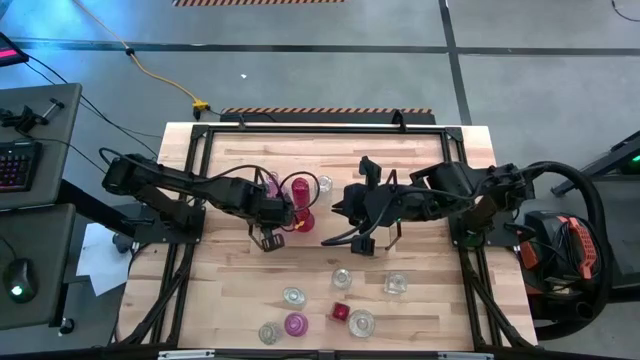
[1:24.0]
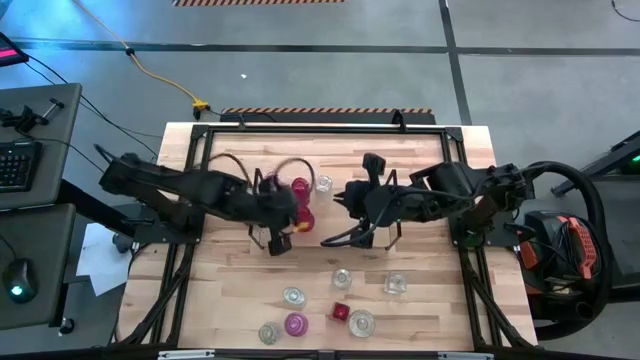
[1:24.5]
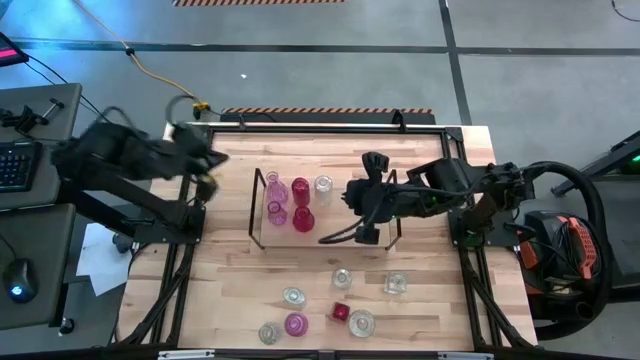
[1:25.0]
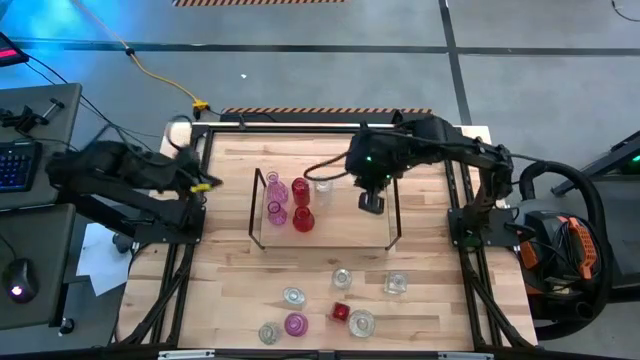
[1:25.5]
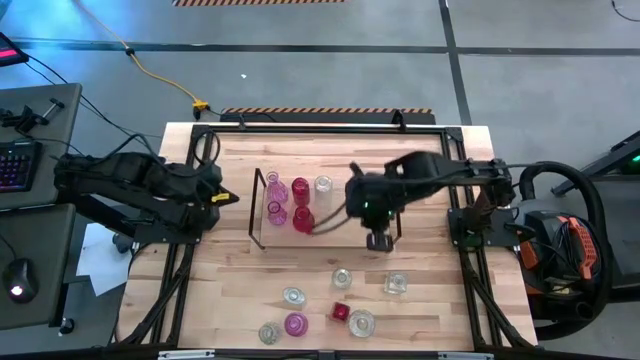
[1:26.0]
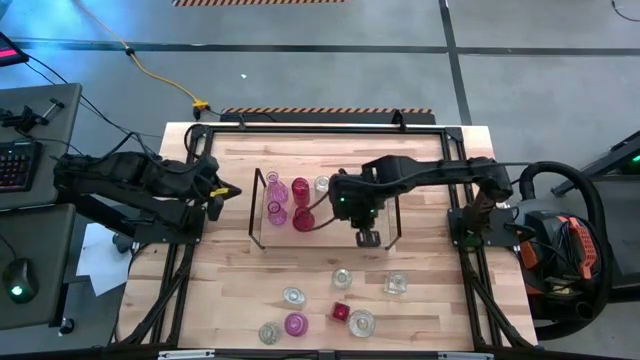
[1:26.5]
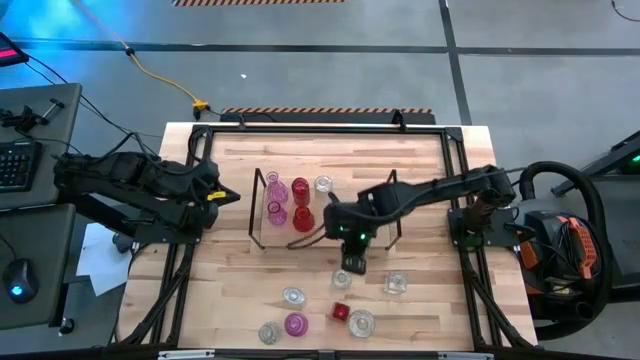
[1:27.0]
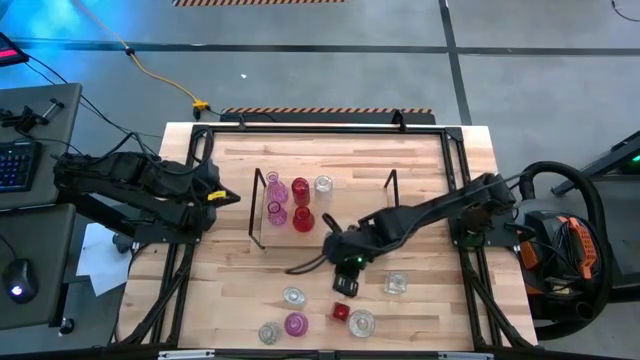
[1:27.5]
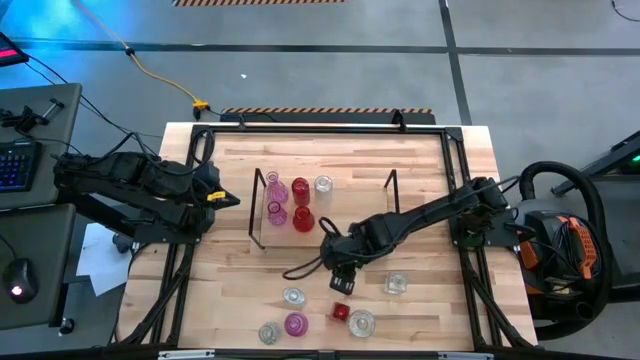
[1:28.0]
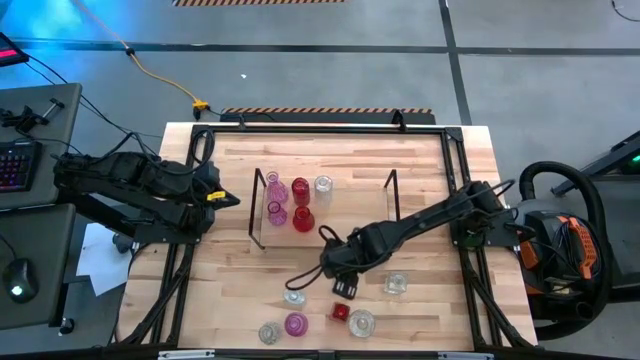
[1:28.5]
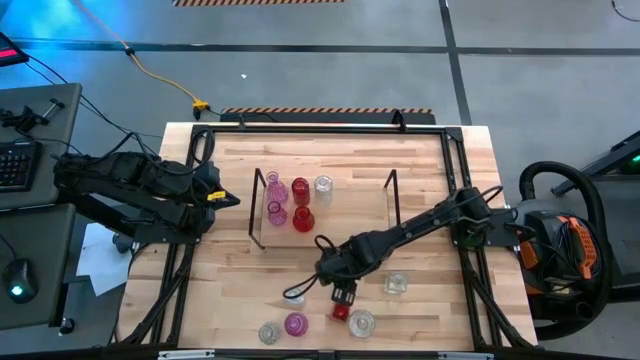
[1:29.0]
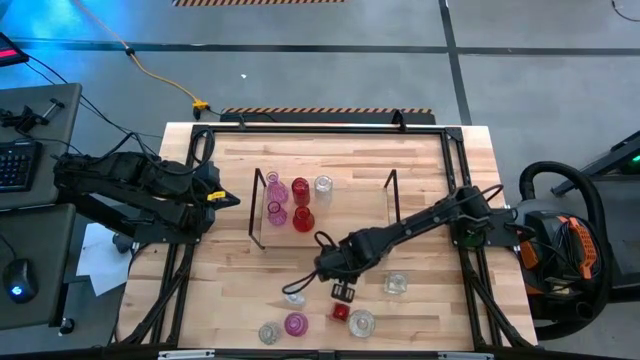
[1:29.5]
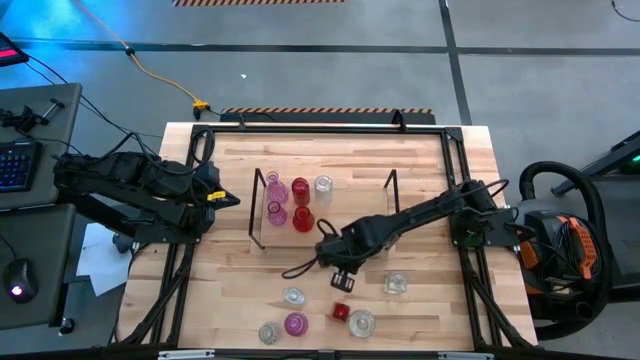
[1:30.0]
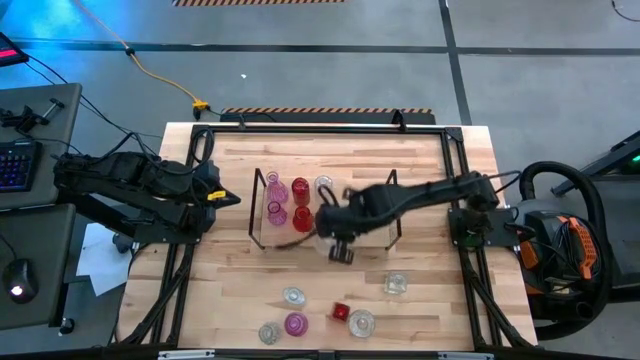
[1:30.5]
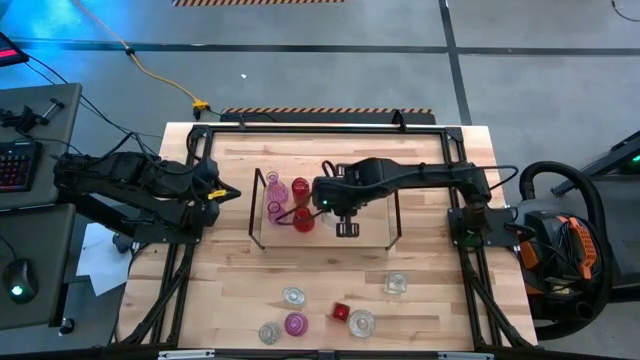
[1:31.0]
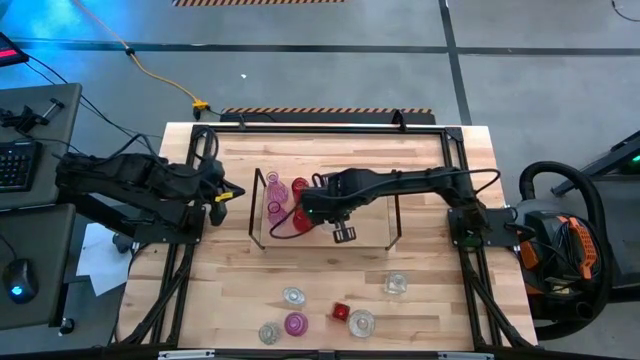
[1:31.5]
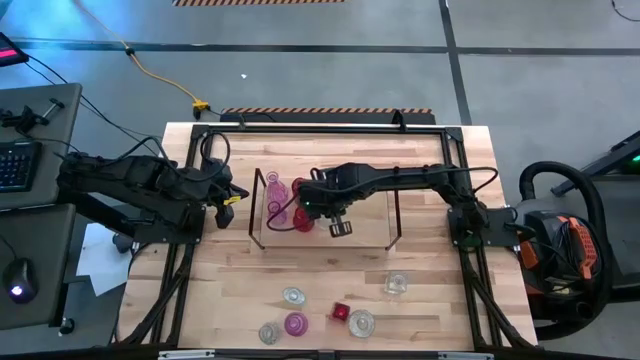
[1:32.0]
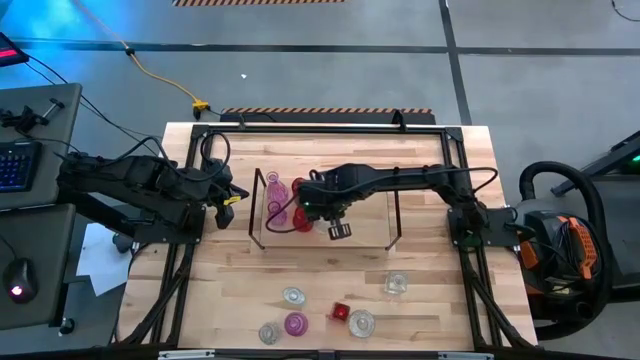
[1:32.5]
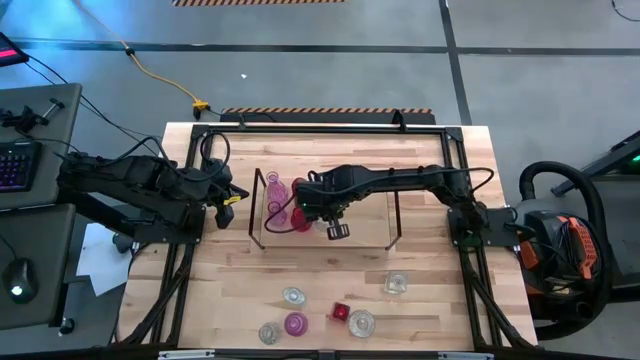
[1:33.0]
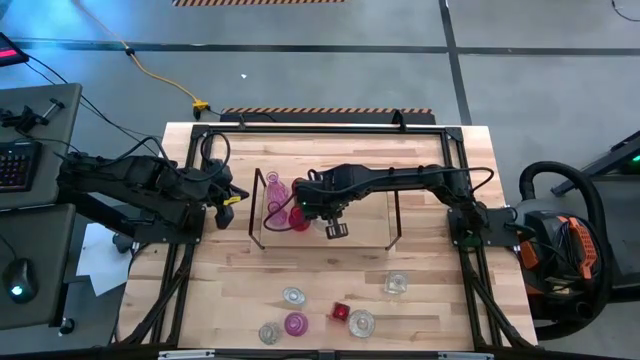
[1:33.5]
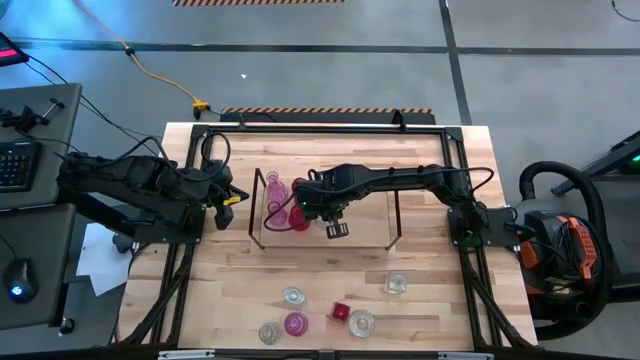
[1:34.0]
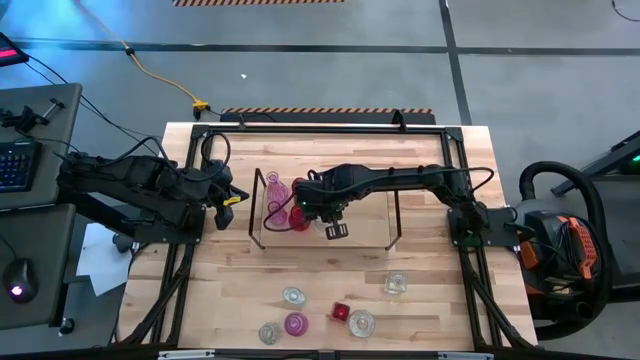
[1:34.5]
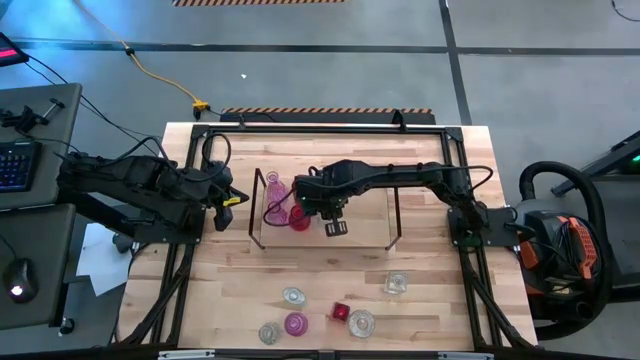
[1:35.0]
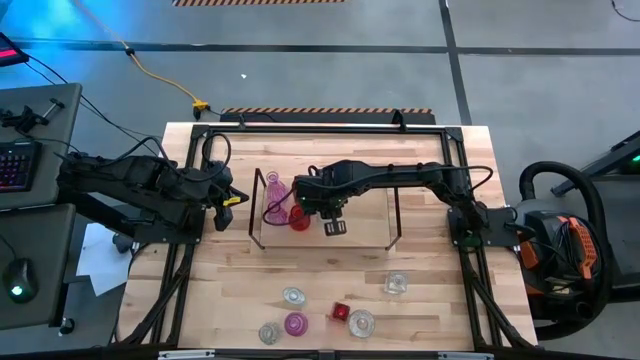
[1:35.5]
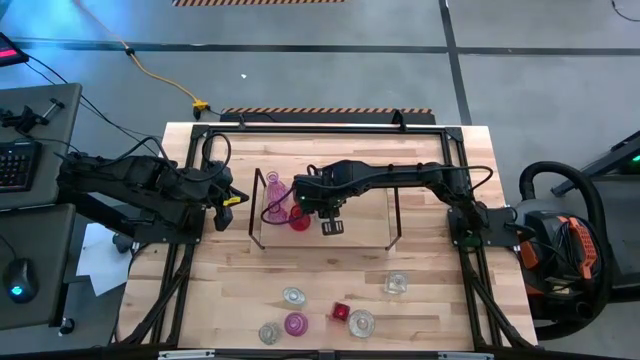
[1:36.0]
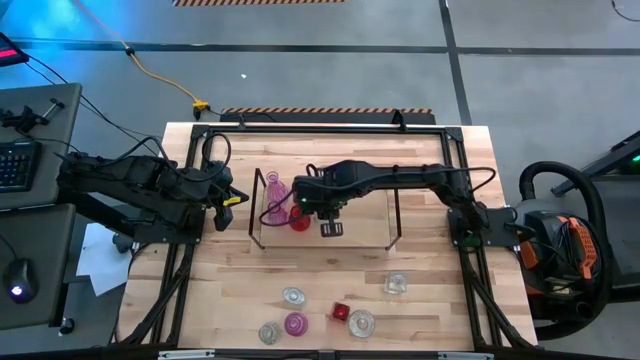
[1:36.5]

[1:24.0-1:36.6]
Task: sort vases onto shelf
Put the transparent vase aligned with the other transparent vase on the shelf

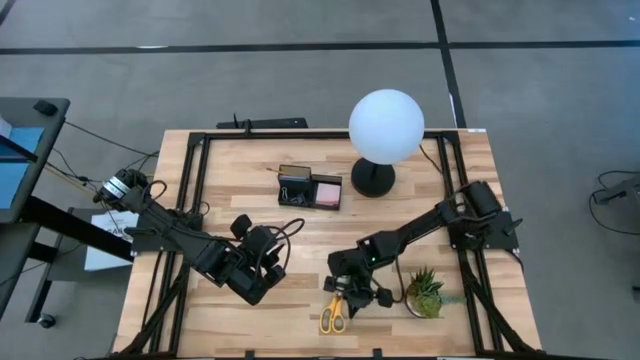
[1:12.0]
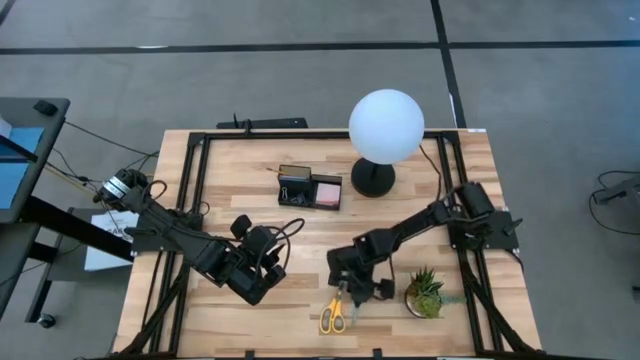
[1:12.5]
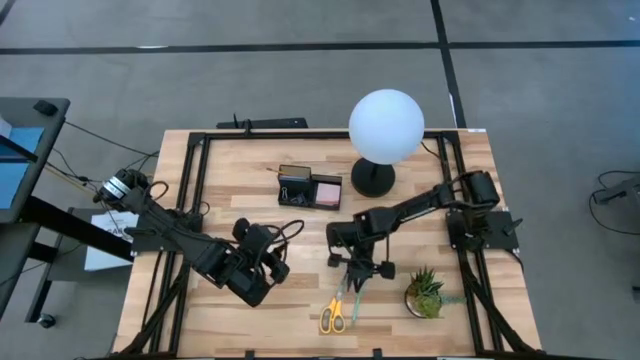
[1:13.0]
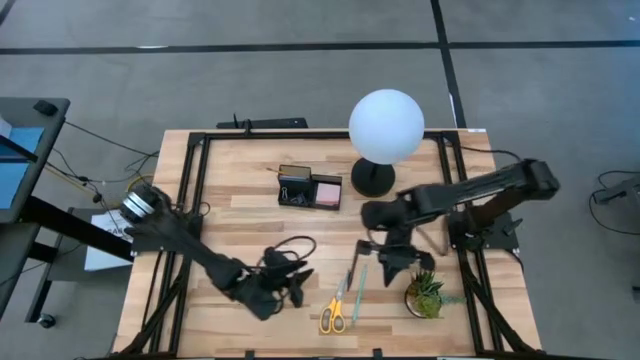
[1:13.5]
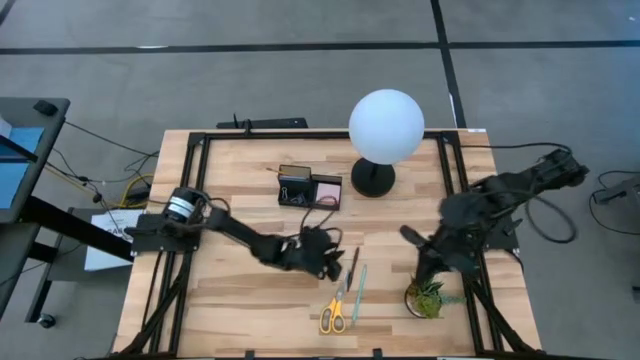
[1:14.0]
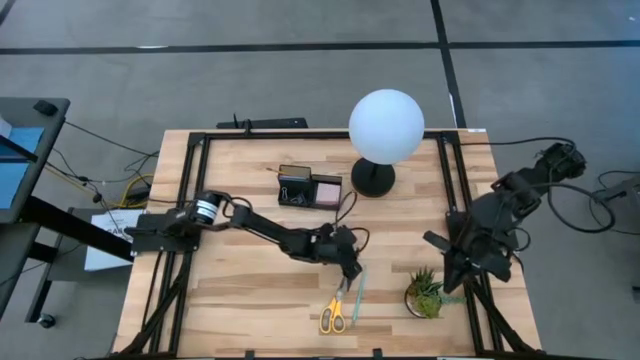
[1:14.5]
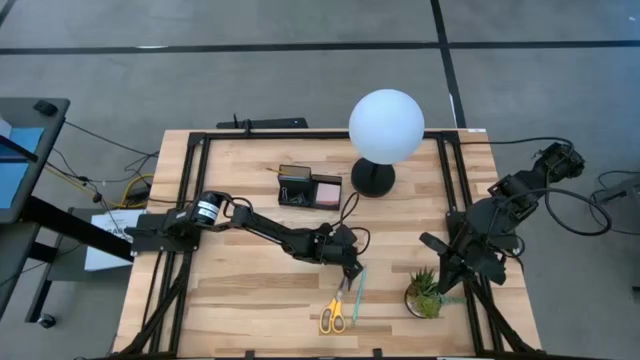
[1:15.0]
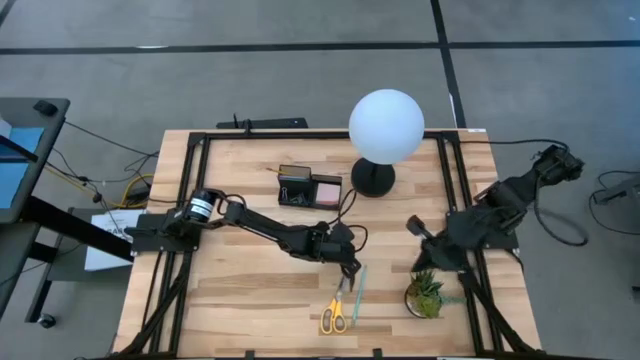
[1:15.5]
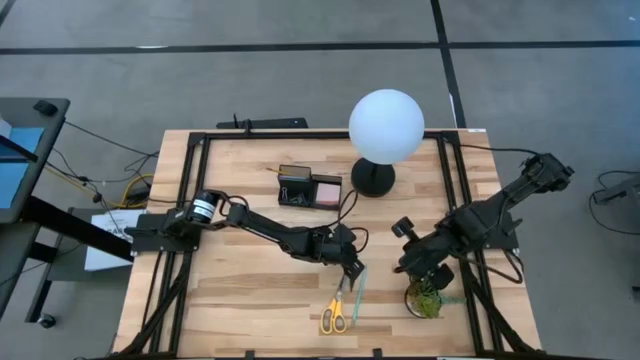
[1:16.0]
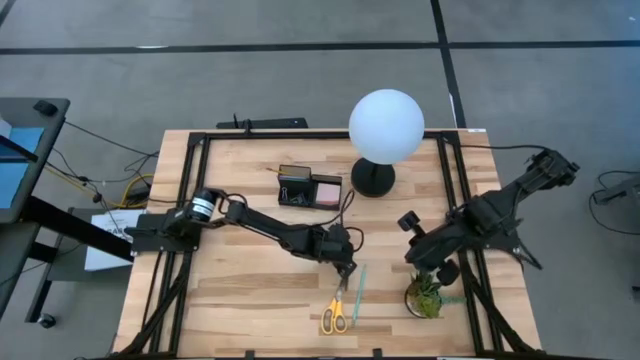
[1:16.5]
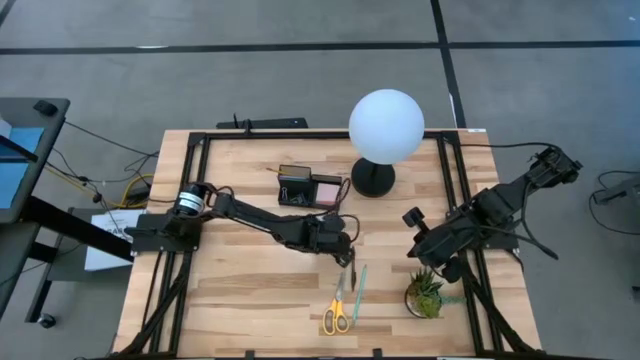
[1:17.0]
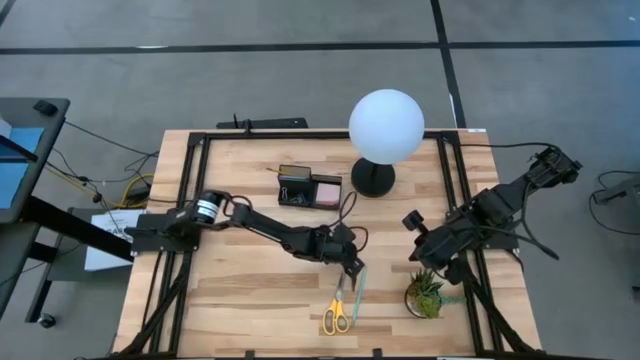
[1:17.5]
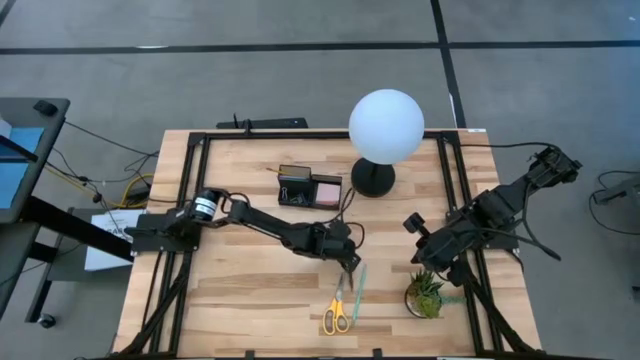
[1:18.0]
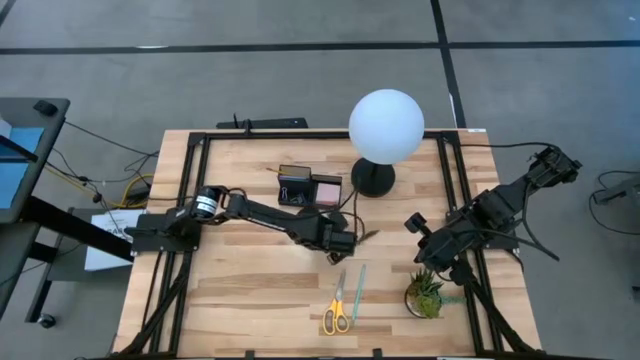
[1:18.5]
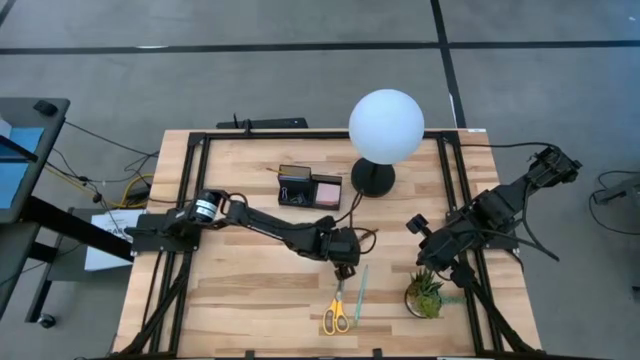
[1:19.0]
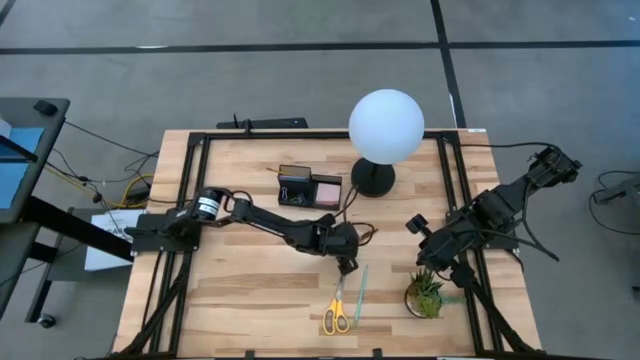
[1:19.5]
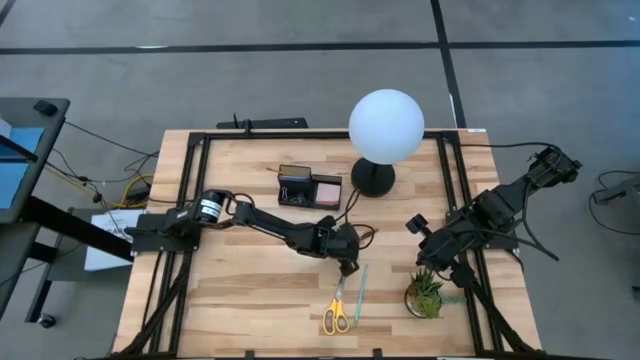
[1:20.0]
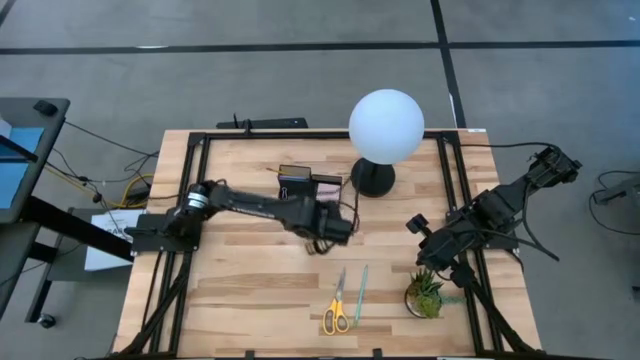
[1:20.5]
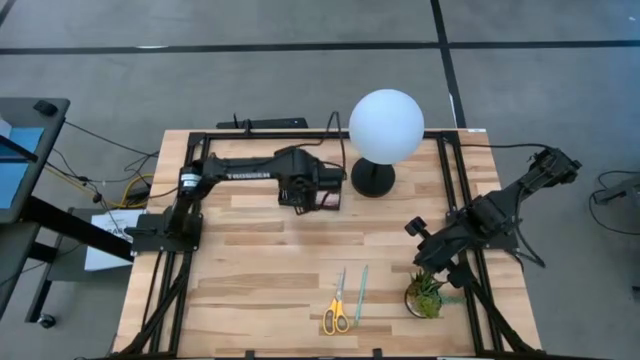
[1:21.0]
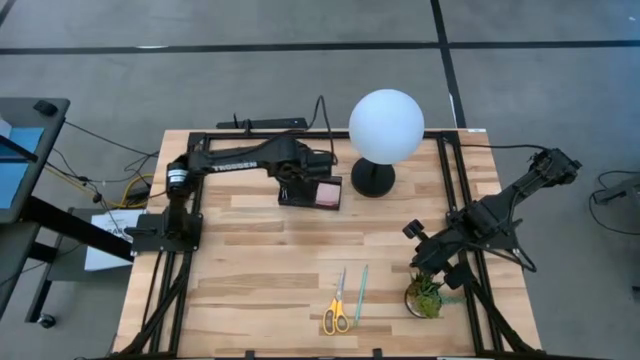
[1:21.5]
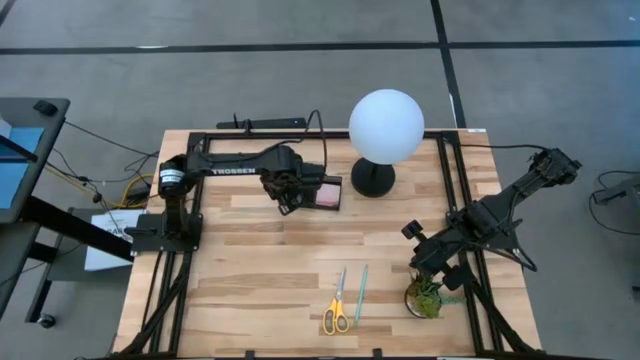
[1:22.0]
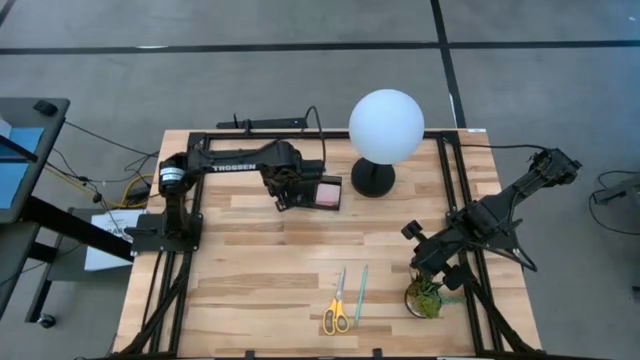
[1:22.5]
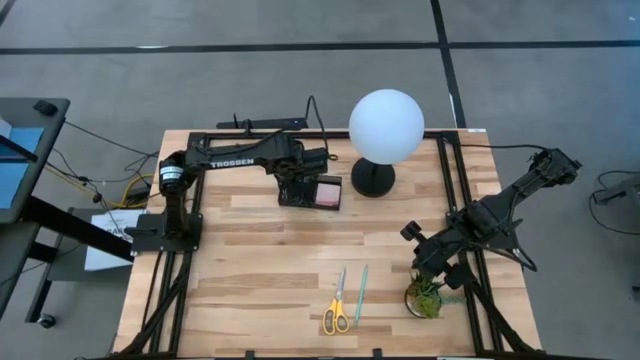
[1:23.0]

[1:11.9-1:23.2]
Task: Pick and place office supplies into organizer
Put the brown pen into the black desk organizer
